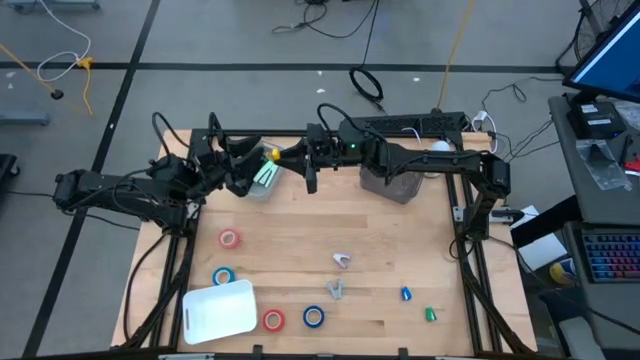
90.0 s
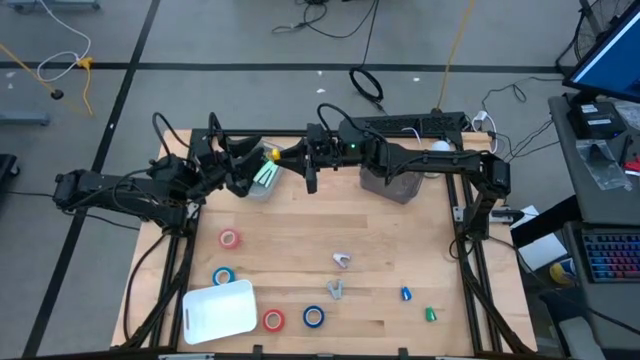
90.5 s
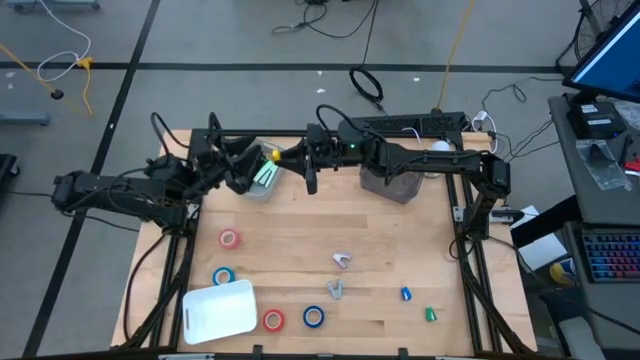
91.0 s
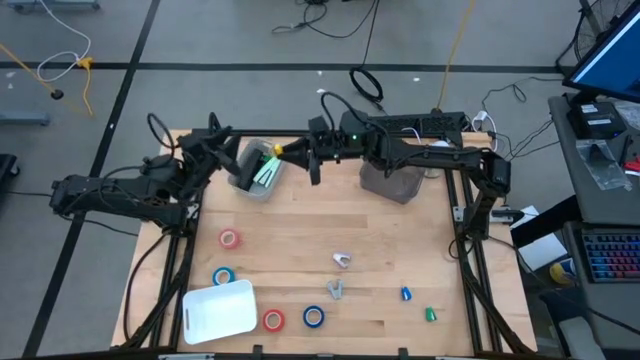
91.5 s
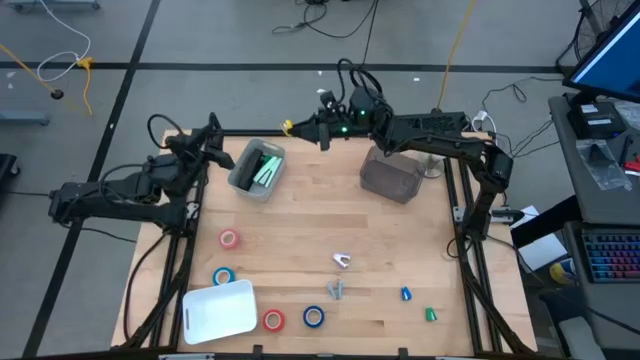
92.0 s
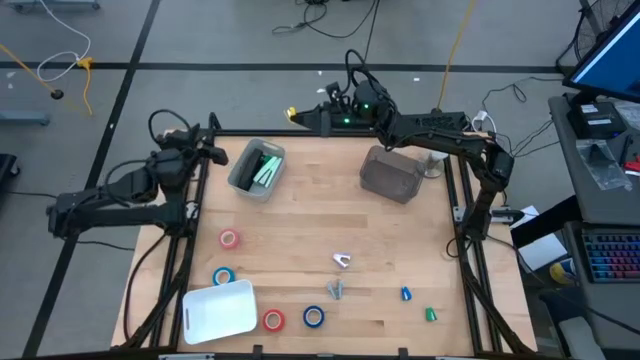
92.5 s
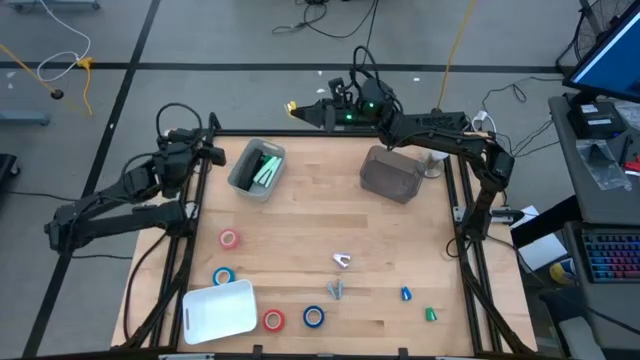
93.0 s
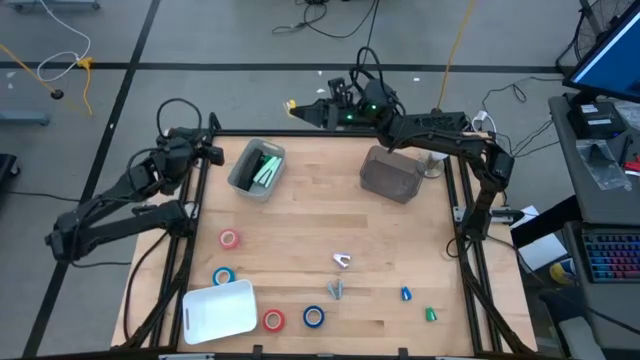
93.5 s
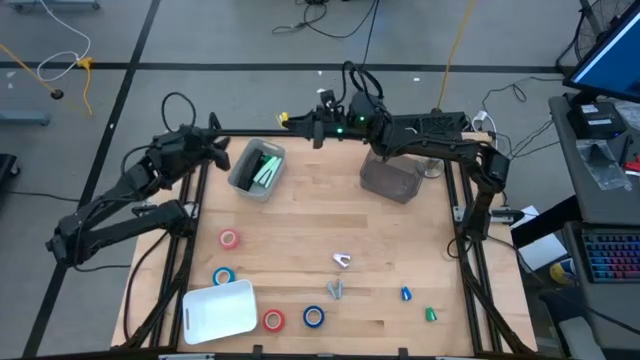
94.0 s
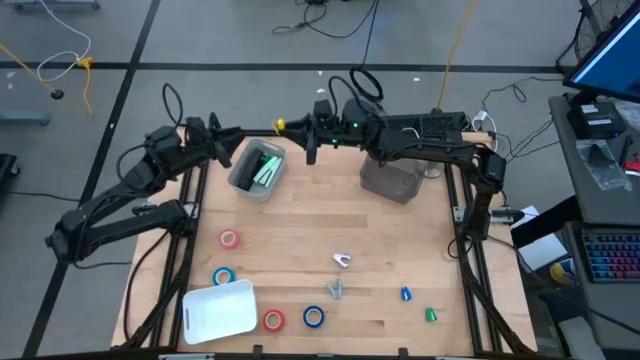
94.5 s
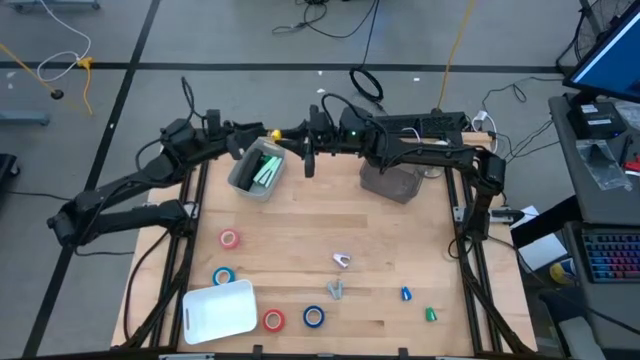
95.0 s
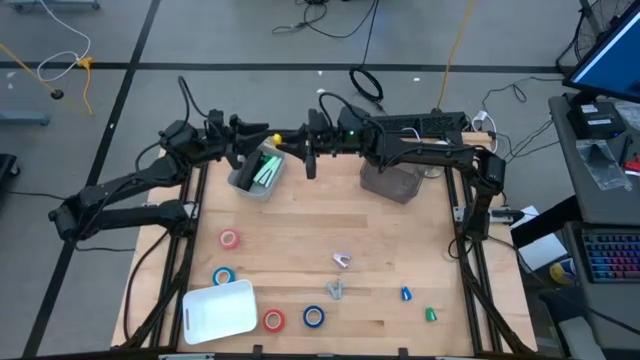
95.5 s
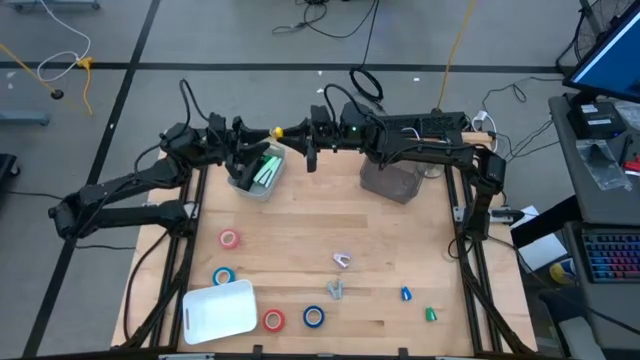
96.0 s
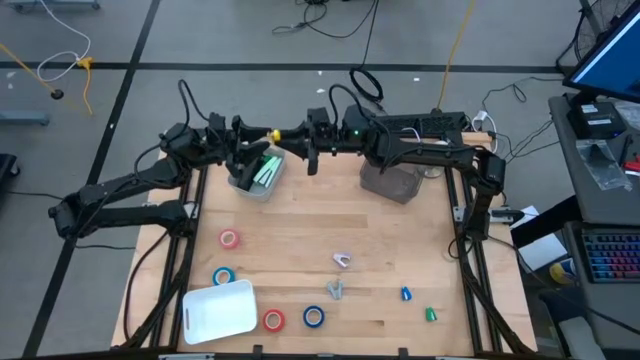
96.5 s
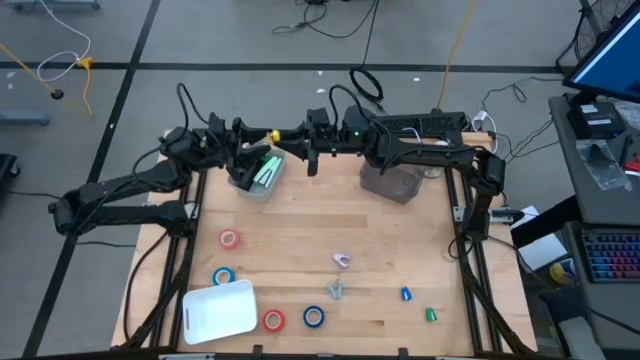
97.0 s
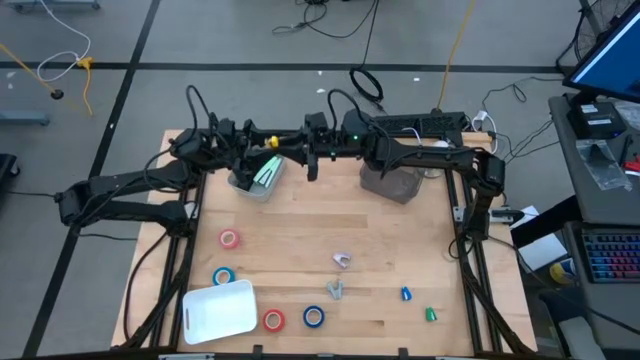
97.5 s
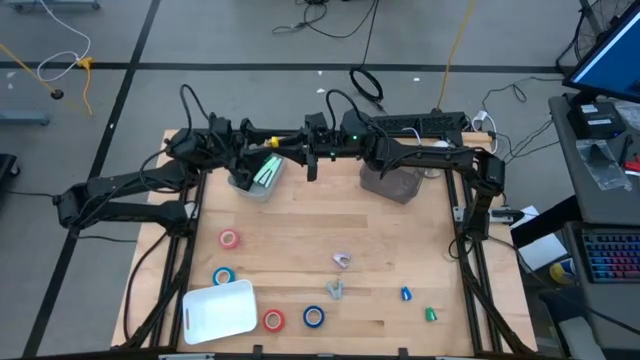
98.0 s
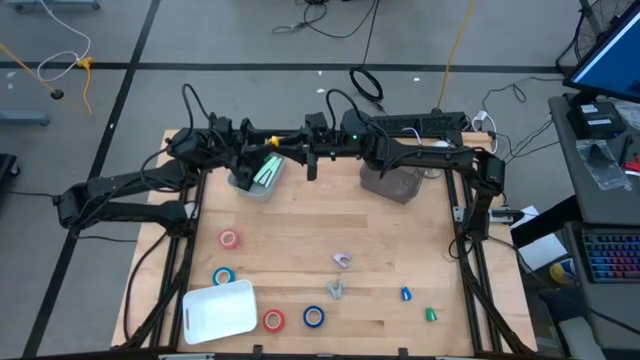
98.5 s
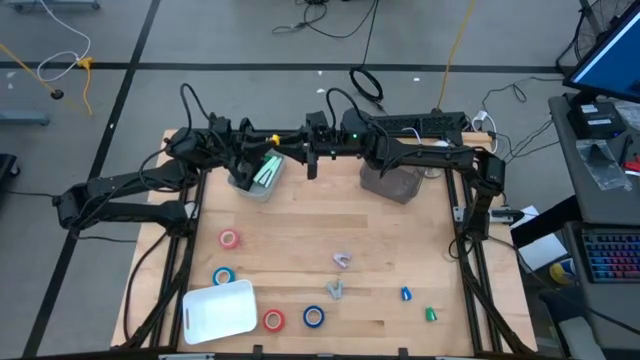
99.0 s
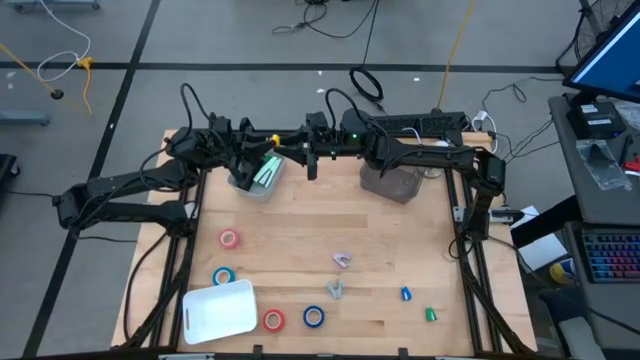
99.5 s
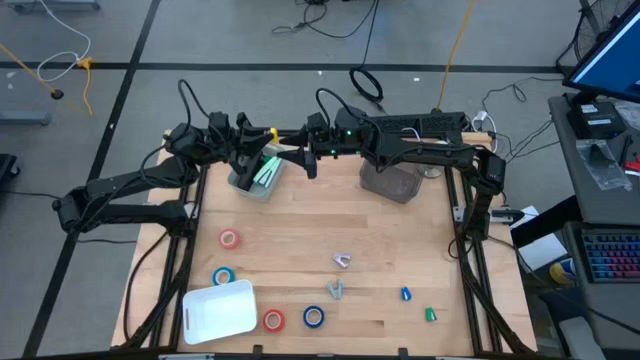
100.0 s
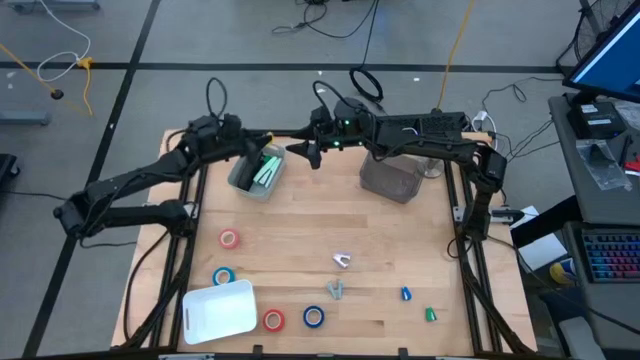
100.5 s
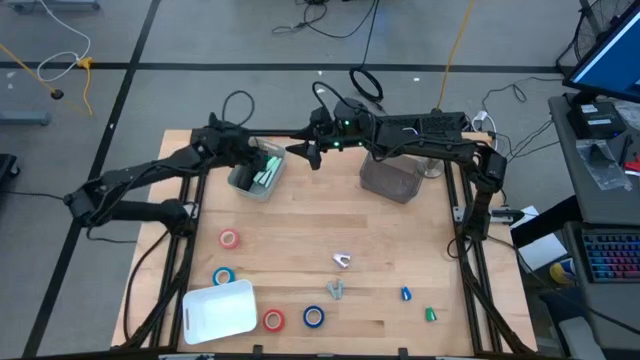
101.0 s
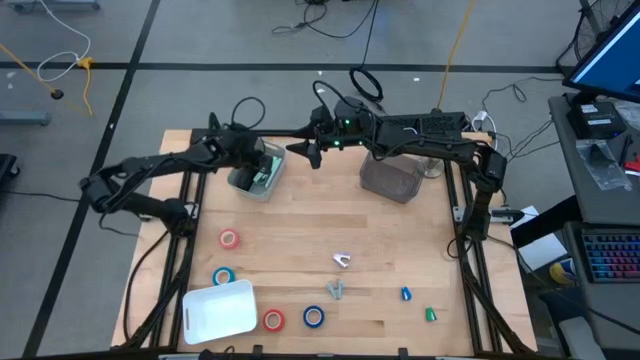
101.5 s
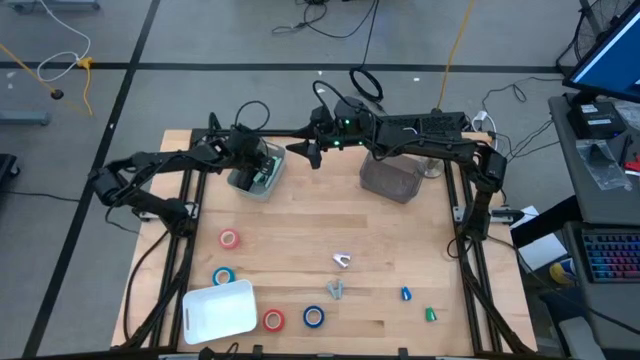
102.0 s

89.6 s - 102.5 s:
Task: Pick and place Stapler, Stapler remover, tape
Put the yellow stapler into the gray bin

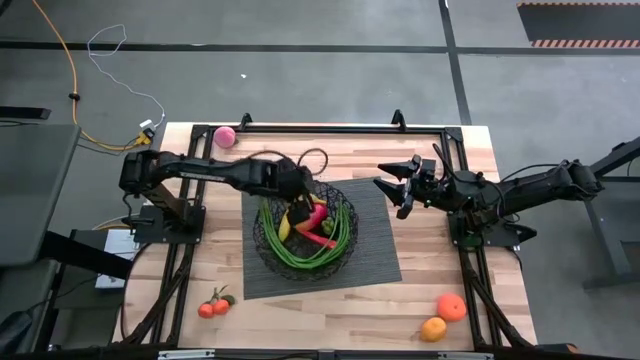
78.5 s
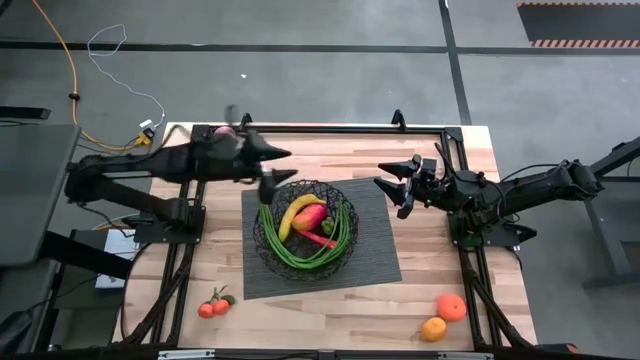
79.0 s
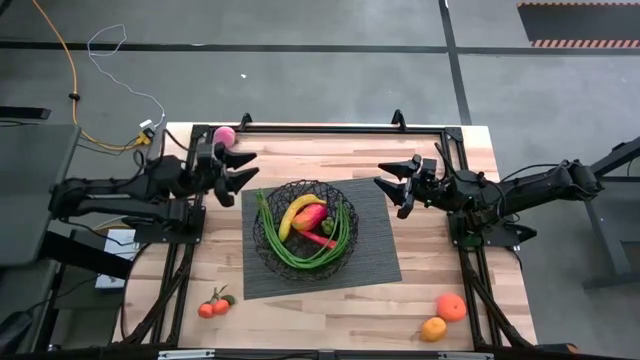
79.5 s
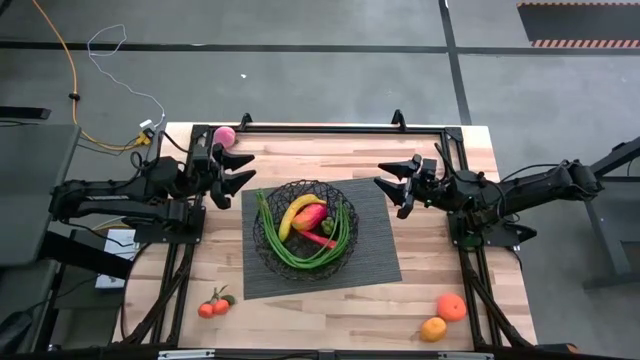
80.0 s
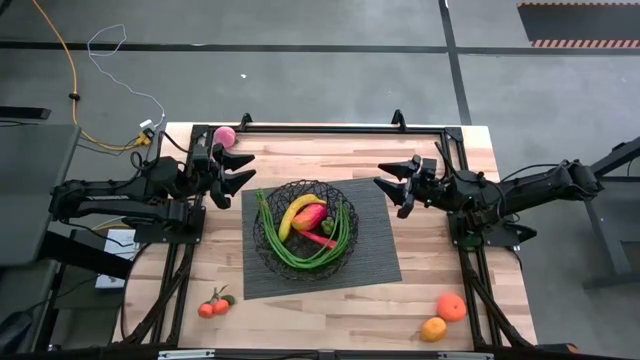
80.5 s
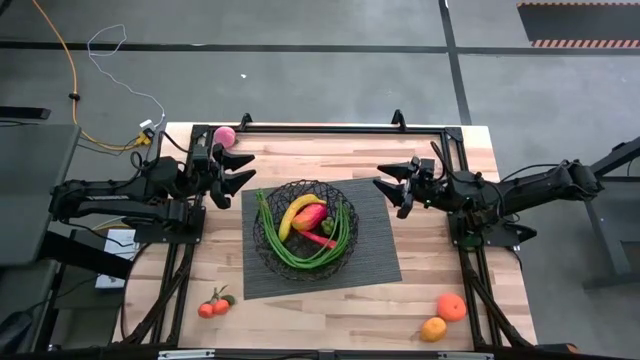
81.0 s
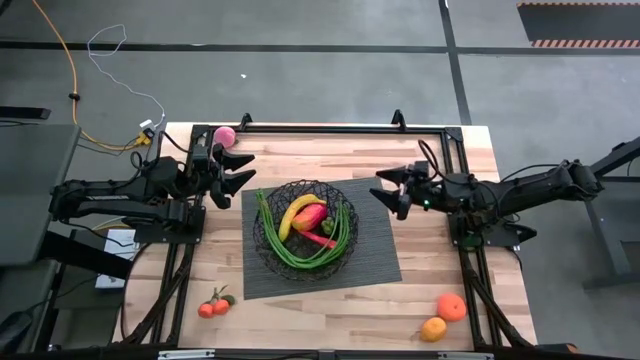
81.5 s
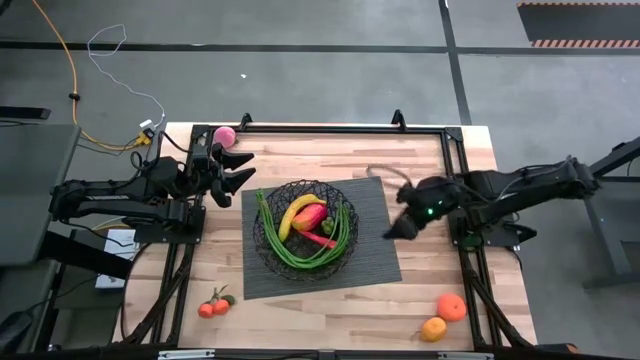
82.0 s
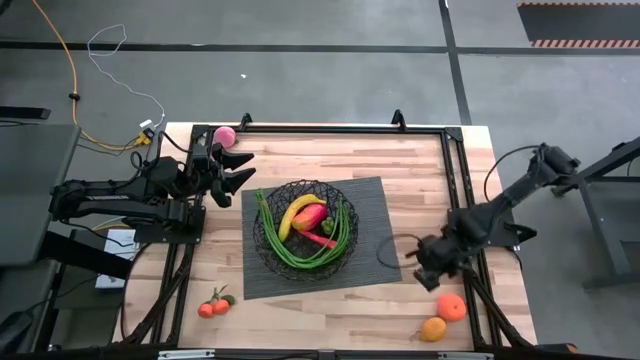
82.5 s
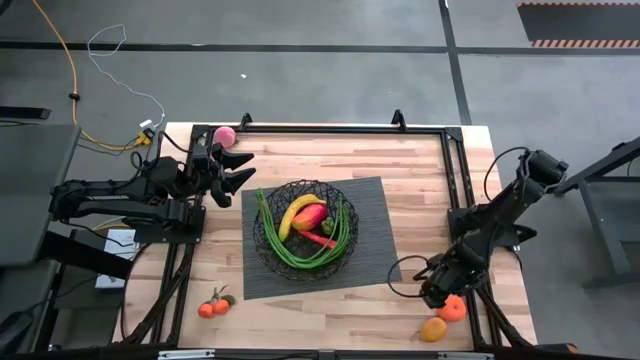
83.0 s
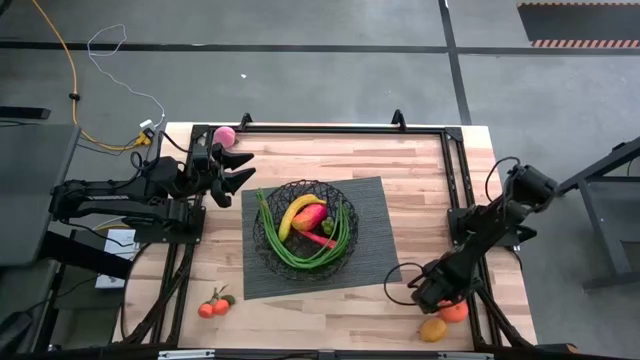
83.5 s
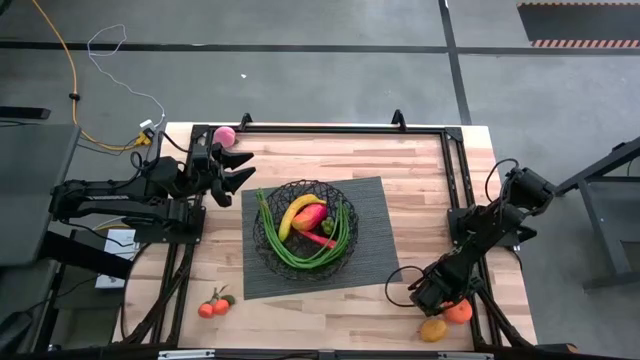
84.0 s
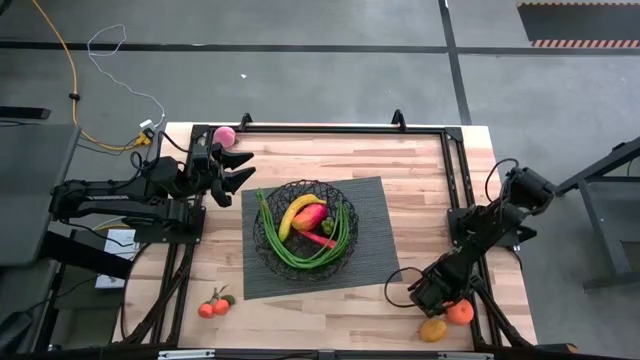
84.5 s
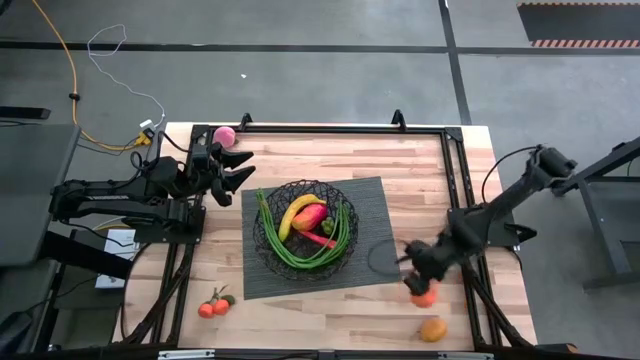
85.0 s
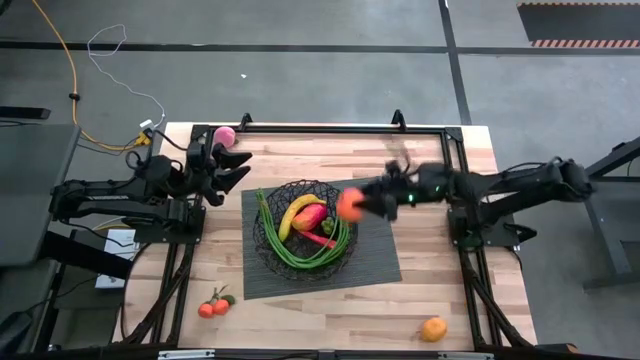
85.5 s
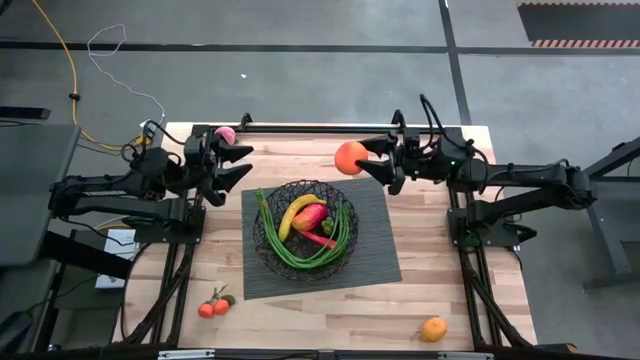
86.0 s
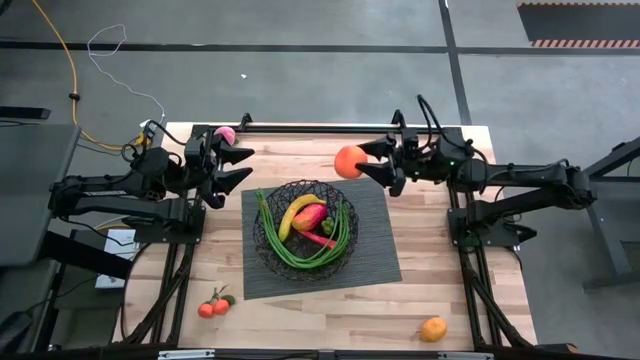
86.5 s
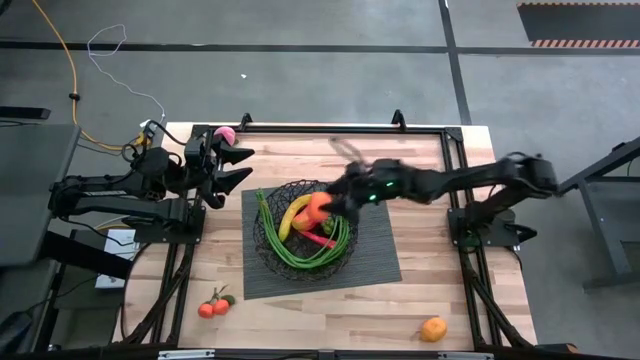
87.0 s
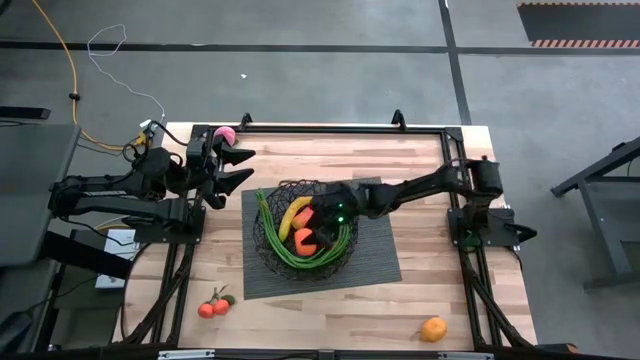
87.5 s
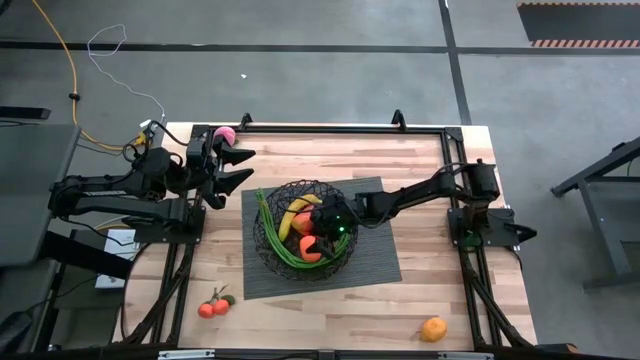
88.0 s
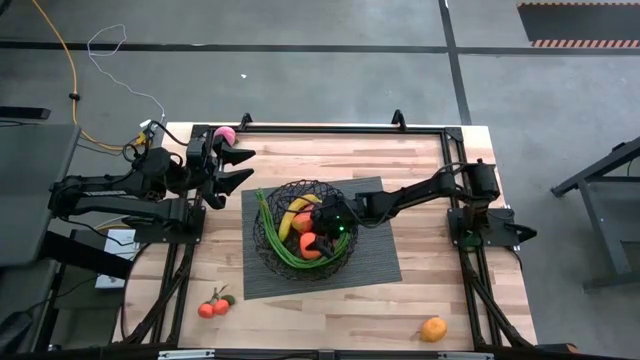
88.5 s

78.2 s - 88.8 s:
Task: Build produce basket
Put the orange into the black mesh basket
